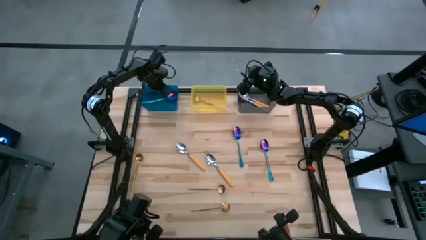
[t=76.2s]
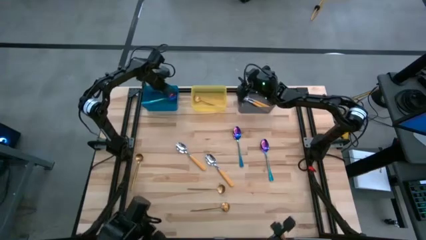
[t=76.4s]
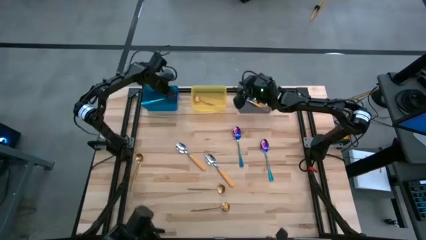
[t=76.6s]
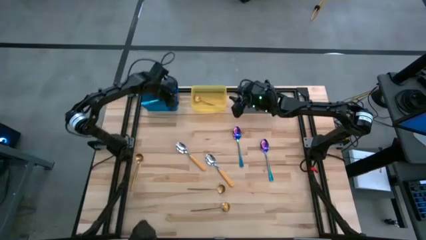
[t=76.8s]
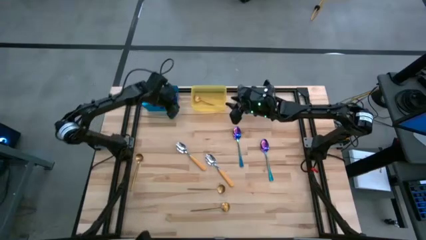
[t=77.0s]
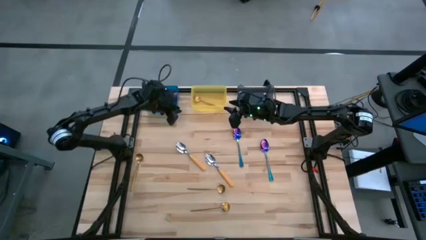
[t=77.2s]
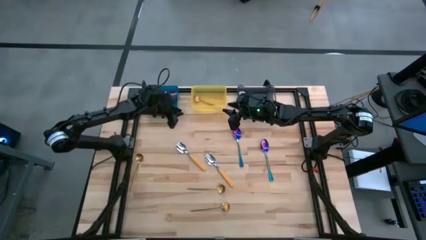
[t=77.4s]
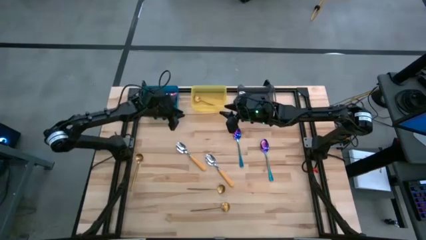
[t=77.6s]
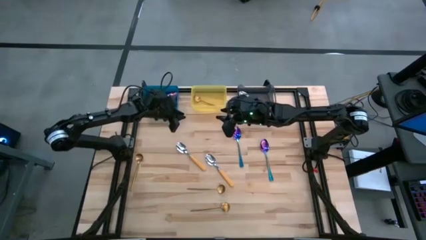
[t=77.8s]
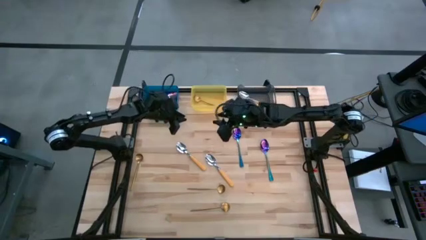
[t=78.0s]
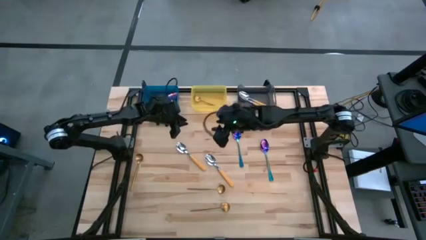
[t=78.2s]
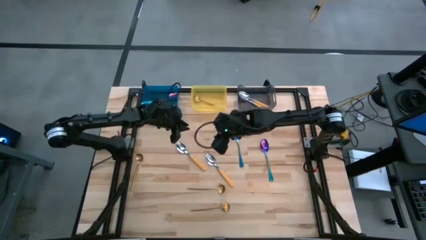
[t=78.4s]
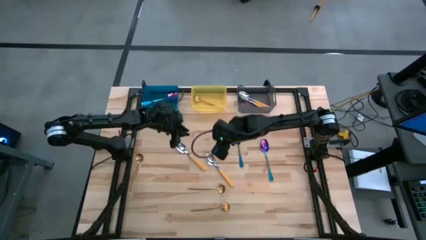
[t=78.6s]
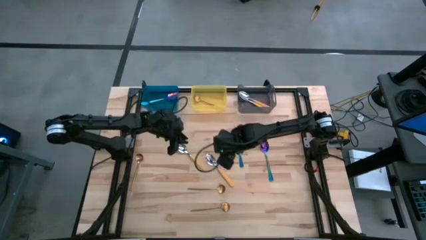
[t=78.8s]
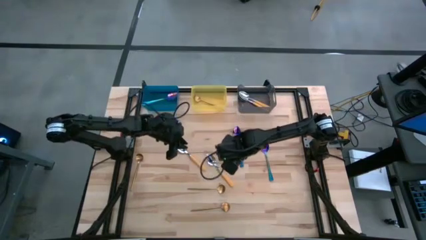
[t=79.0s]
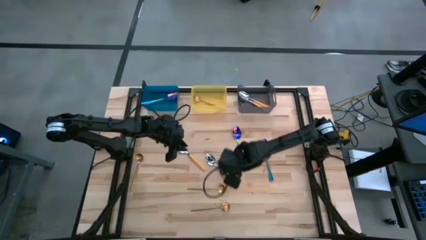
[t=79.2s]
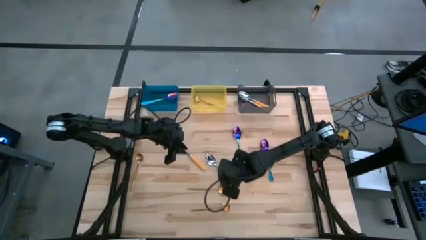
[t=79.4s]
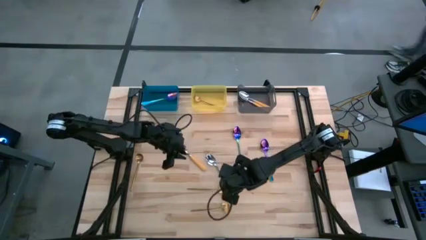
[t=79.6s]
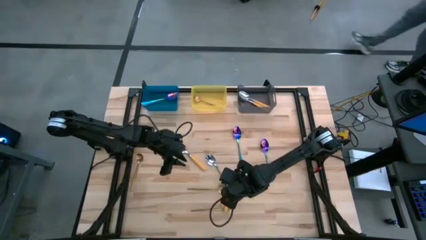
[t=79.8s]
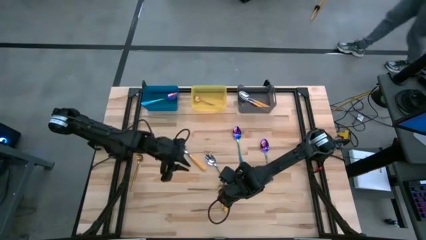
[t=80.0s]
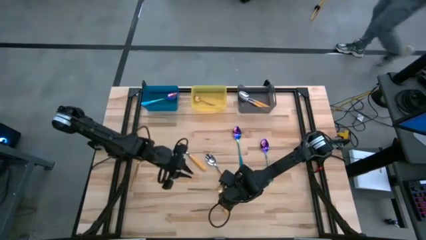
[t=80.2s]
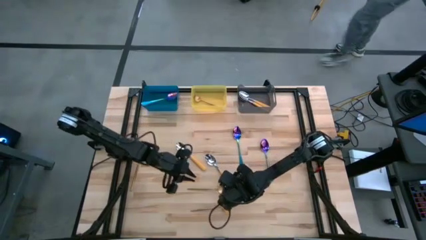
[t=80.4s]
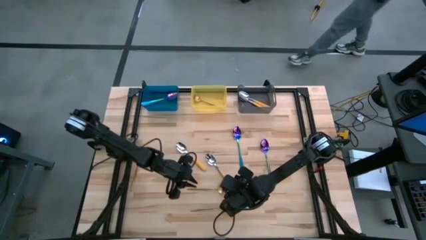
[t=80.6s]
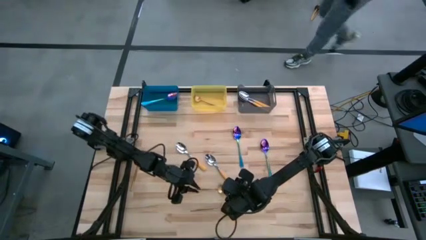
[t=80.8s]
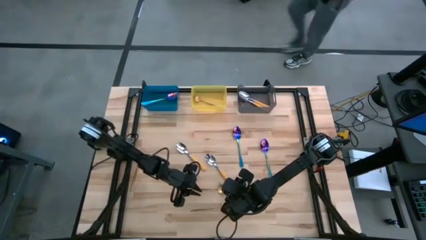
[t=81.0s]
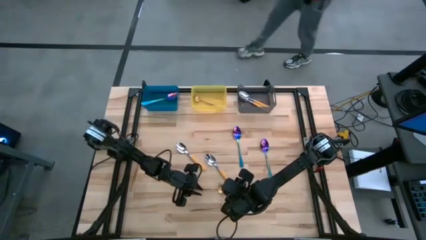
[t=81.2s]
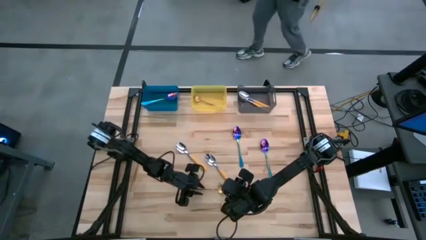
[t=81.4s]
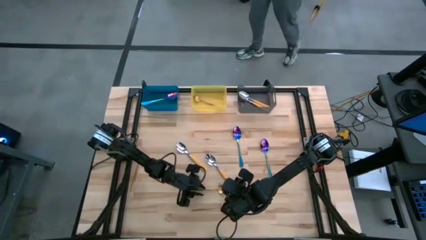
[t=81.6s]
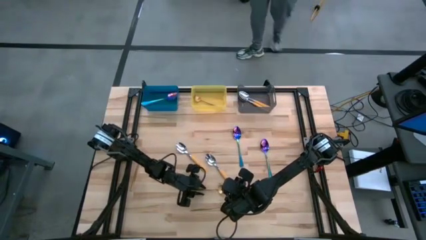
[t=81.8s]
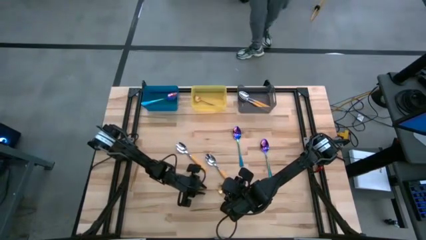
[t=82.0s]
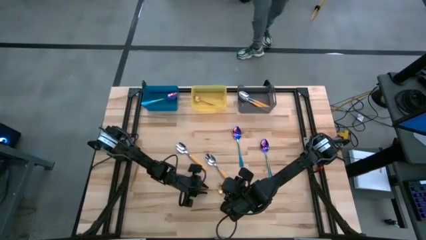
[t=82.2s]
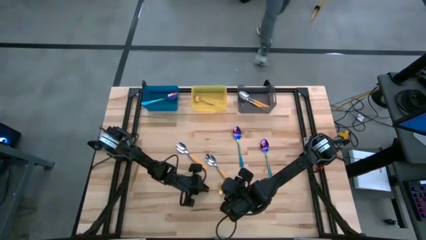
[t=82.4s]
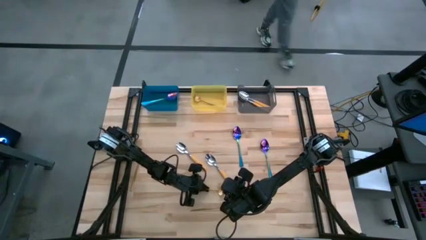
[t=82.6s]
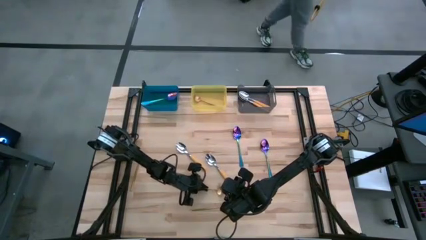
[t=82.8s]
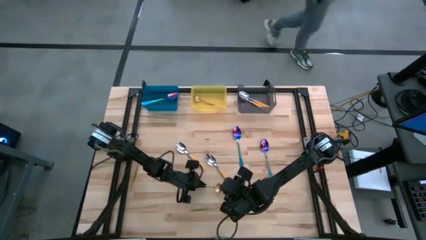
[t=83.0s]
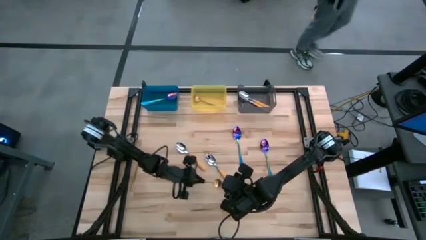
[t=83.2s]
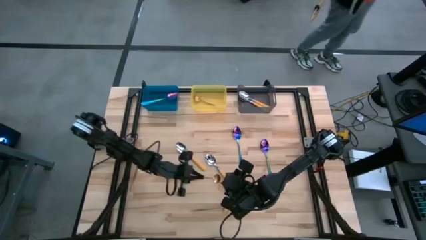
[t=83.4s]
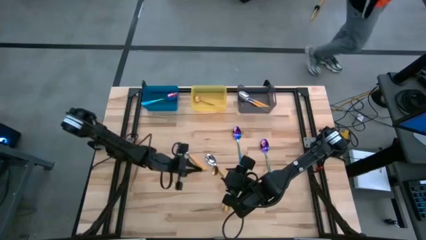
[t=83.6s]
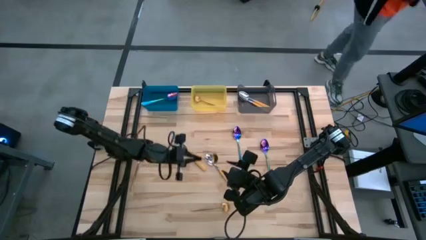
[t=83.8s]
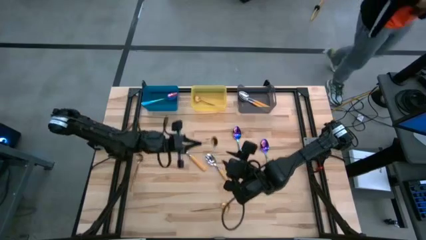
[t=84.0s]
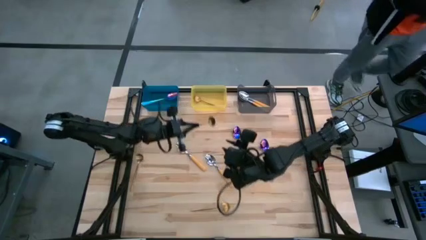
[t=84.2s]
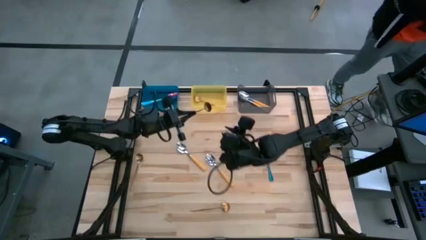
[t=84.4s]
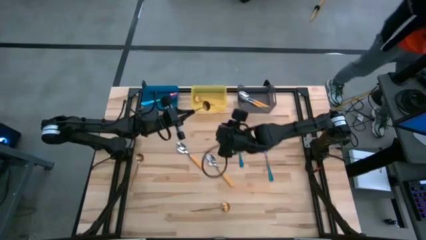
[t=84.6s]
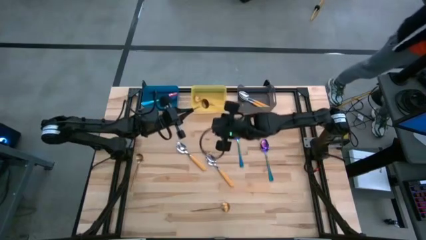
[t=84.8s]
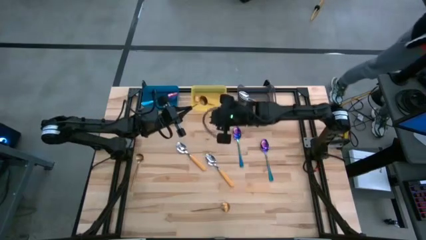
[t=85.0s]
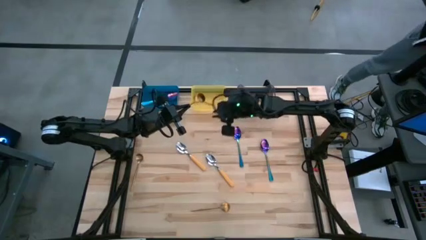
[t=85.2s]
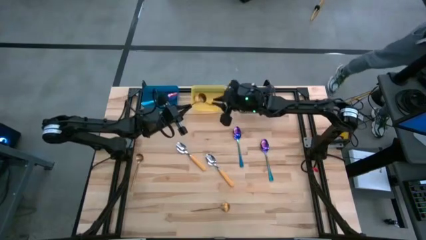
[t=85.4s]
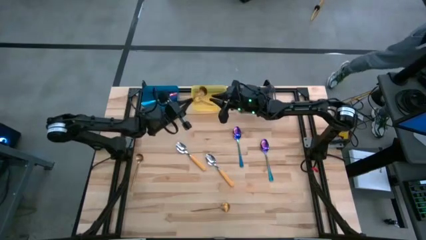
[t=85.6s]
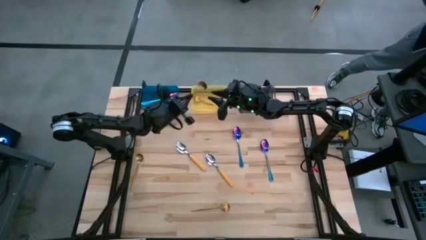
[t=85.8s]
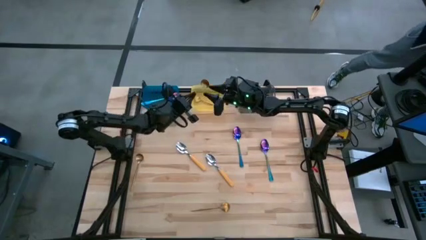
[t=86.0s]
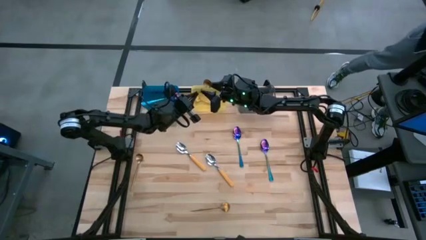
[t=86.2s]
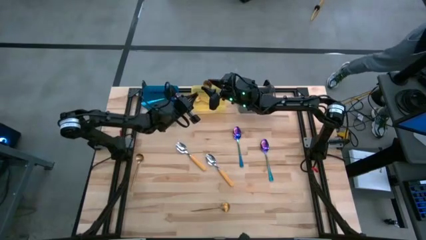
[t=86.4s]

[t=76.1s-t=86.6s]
Task: Sort silverware by color (type)
Put the gold spoon into the yellow bin

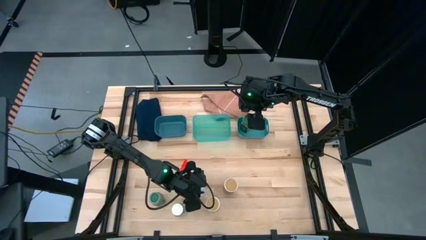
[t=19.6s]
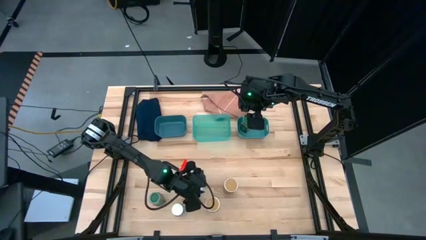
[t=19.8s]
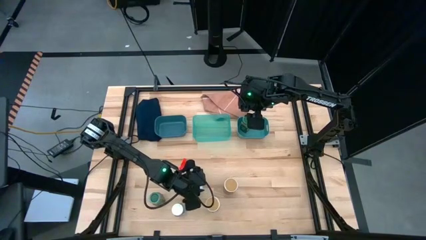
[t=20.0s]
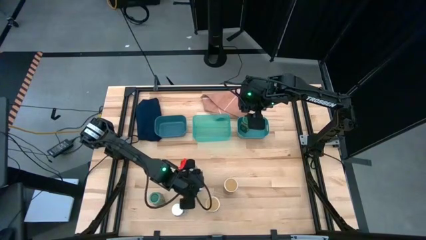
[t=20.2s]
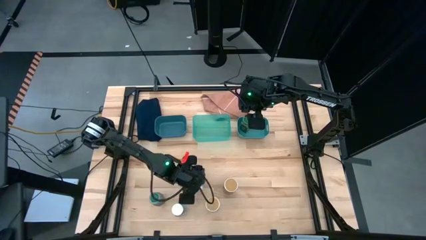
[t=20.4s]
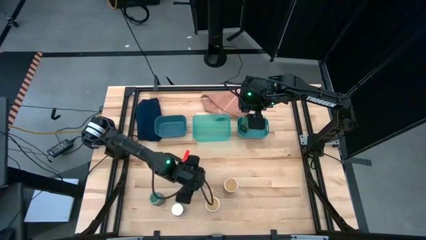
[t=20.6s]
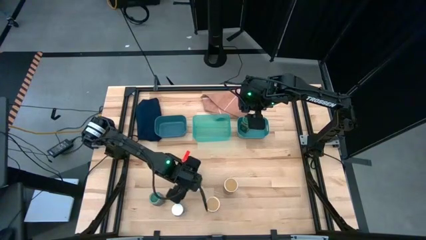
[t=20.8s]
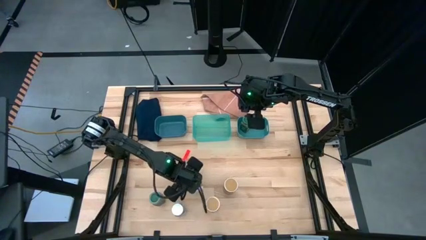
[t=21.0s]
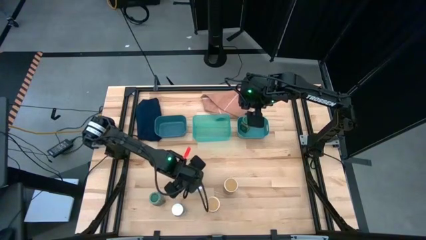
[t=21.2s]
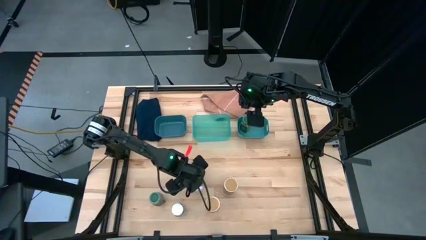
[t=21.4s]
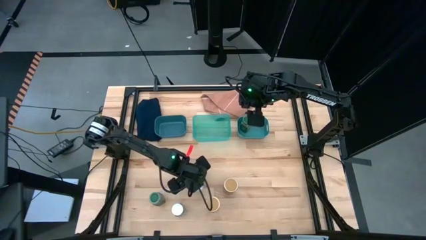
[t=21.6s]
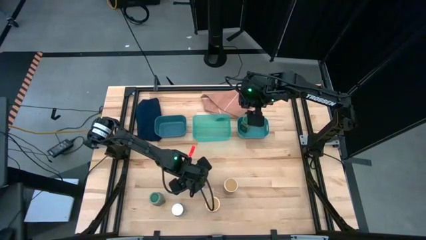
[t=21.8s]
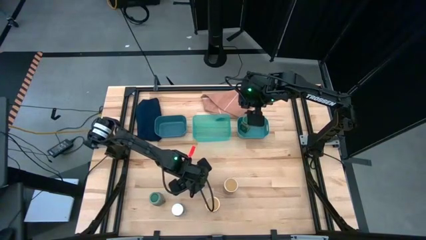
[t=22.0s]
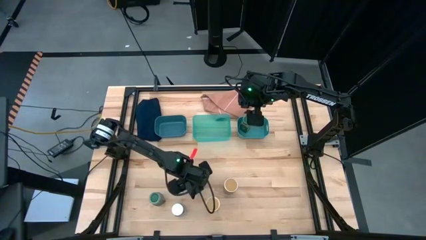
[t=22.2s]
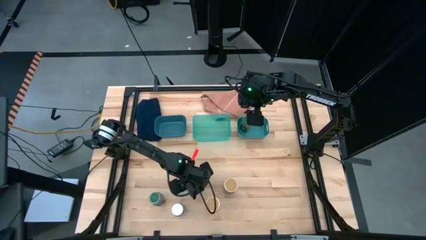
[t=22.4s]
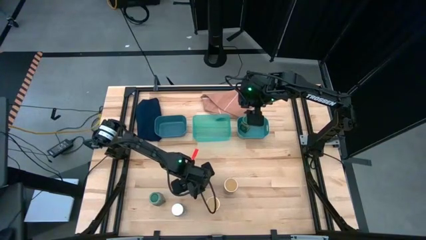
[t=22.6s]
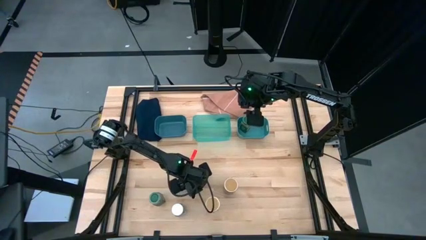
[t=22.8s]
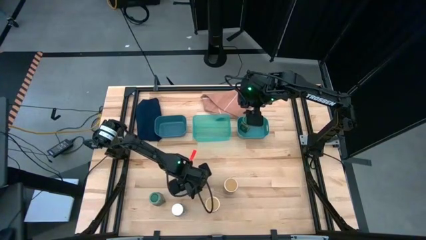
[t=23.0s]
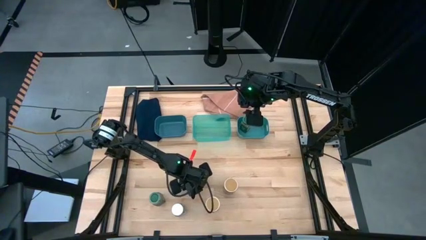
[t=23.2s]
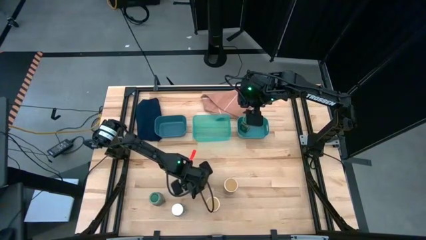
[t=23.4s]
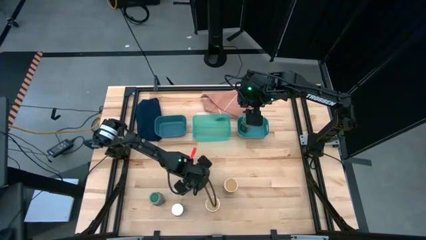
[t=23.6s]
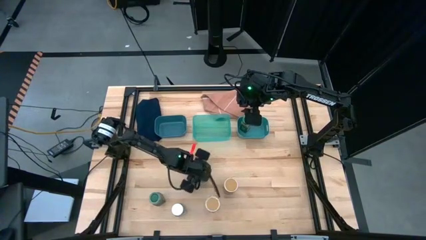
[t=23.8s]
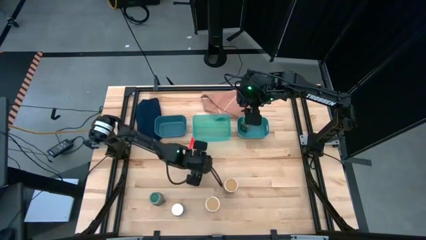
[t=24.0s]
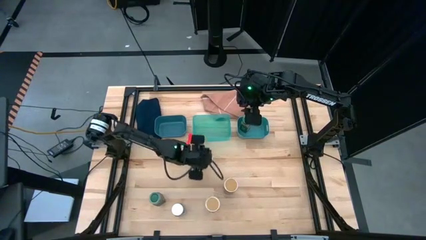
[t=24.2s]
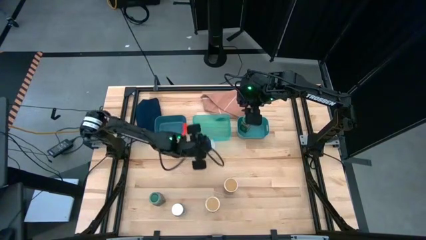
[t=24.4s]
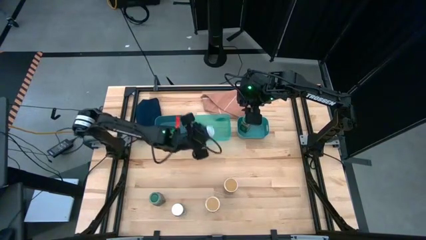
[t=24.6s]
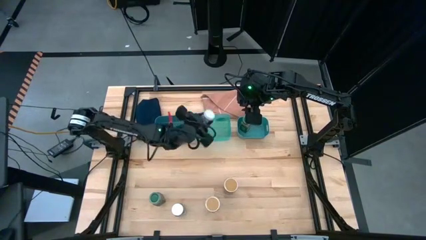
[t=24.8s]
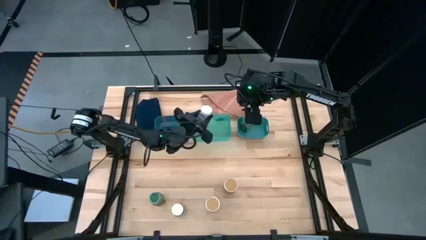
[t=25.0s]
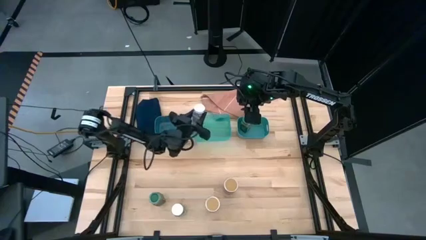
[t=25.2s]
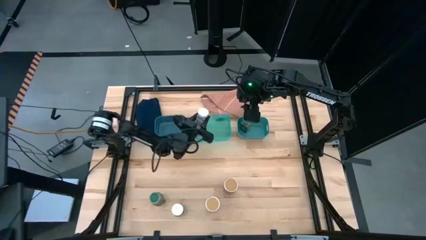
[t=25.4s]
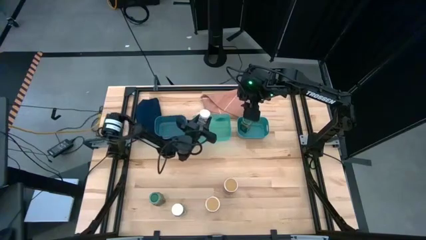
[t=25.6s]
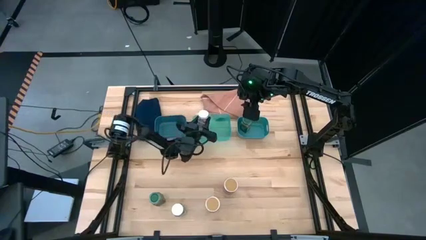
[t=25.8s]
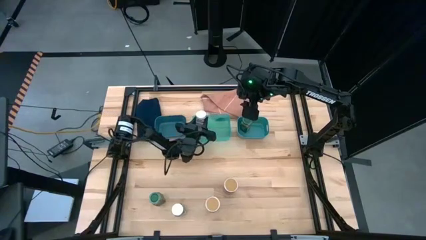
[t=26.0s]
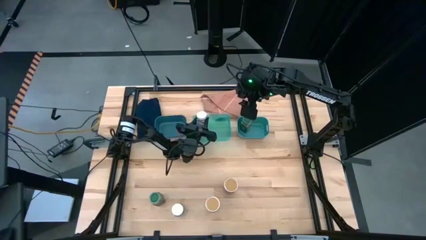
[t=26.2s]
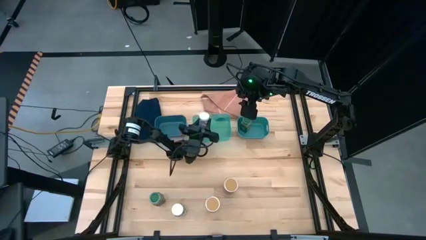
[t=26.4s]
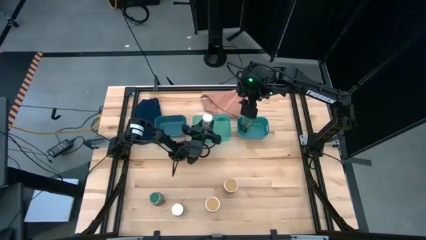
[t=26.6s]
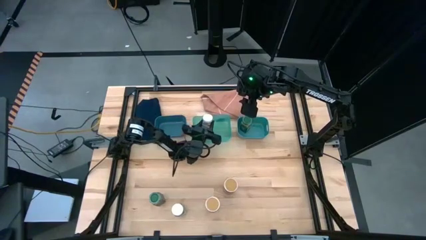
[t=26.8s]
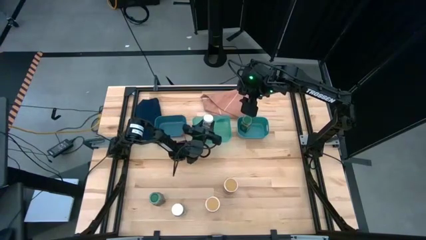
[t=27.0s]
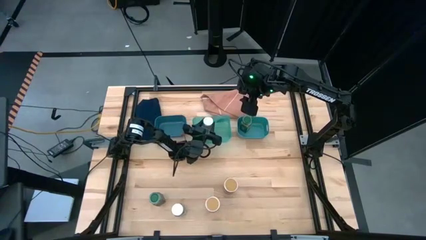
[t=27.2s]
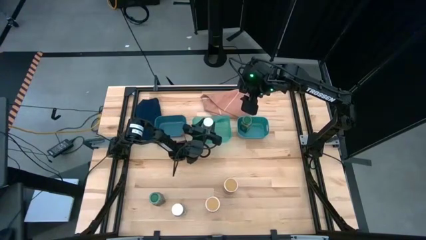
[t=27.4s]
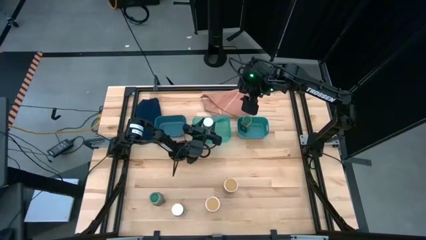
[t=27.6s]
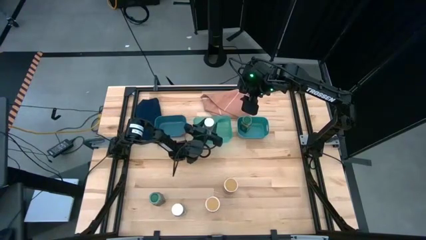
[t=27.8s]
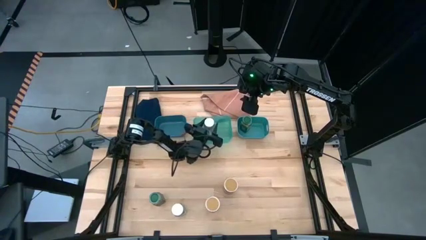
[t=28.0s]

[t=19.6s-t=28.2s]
Task: Sort spices by type
Put the top white seasoning bottle into the transparent green bin
